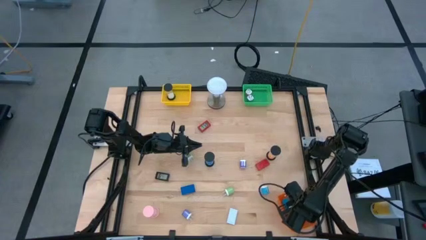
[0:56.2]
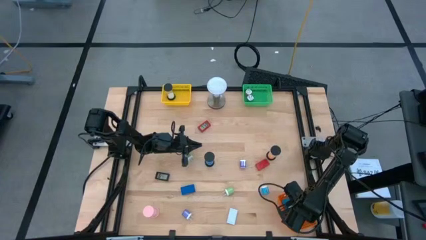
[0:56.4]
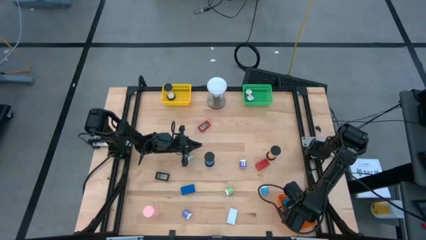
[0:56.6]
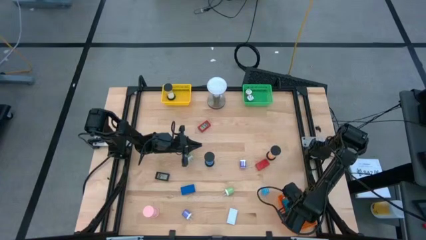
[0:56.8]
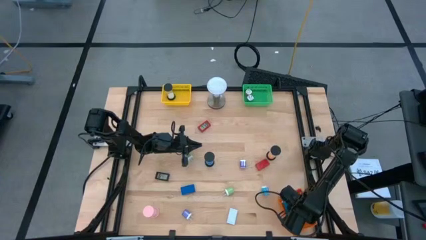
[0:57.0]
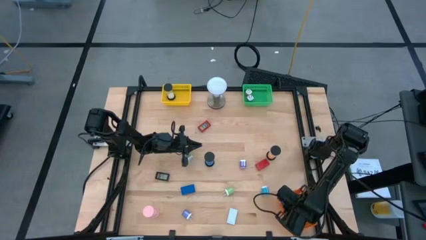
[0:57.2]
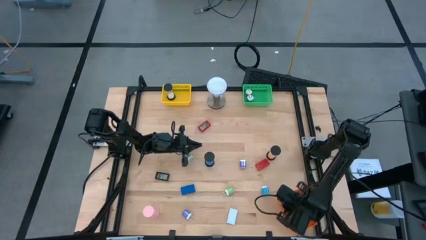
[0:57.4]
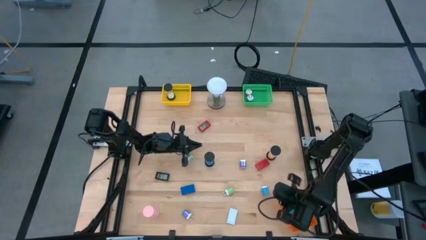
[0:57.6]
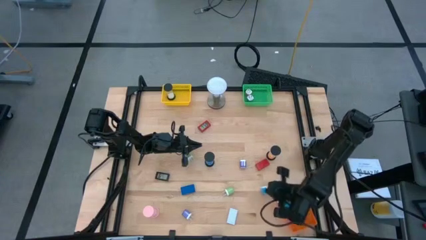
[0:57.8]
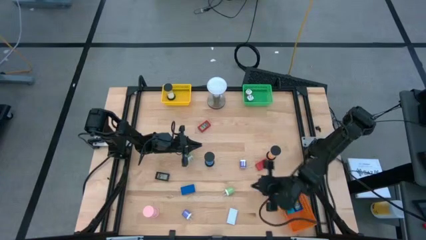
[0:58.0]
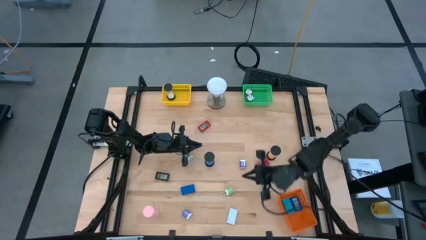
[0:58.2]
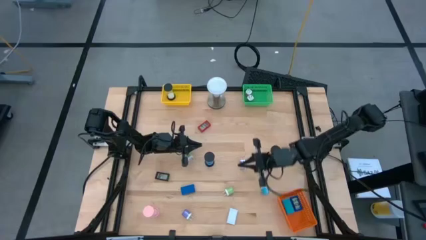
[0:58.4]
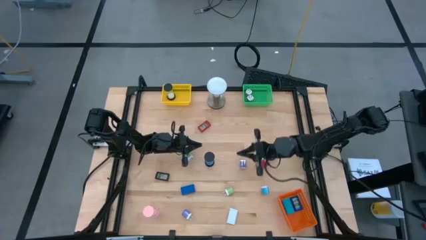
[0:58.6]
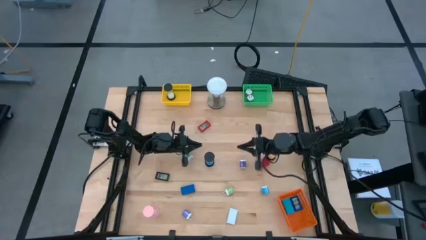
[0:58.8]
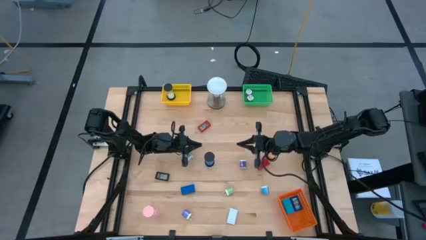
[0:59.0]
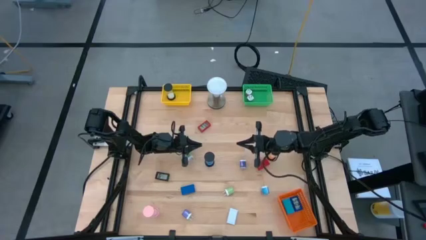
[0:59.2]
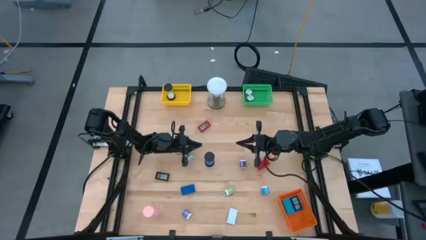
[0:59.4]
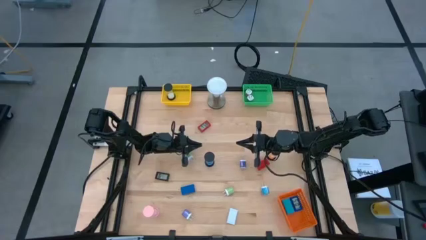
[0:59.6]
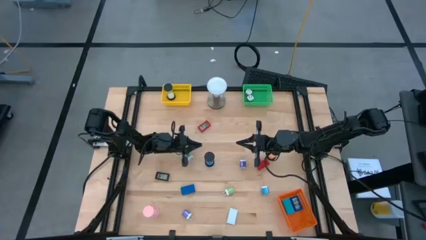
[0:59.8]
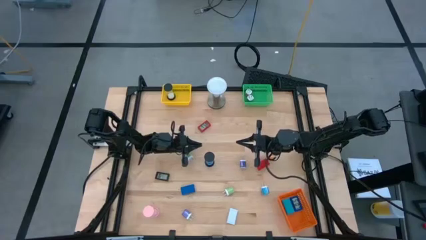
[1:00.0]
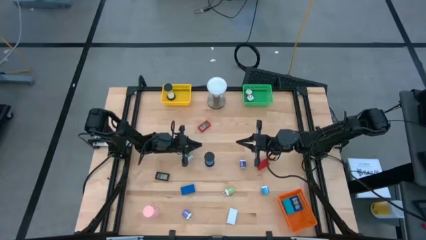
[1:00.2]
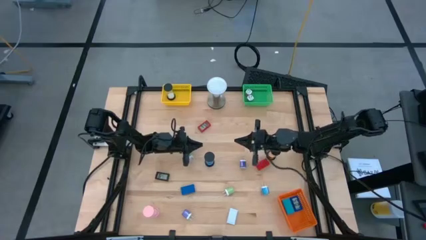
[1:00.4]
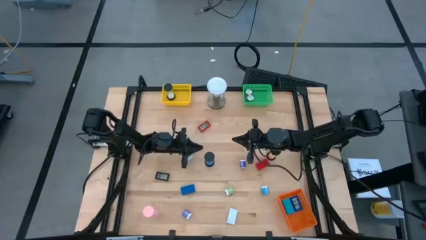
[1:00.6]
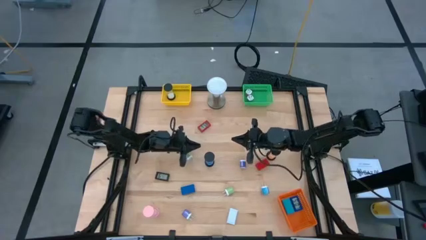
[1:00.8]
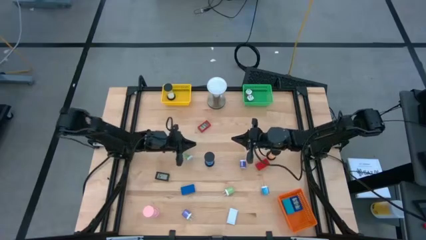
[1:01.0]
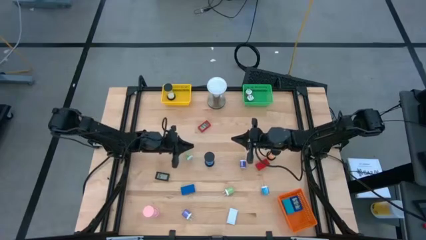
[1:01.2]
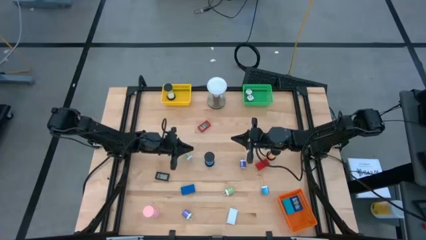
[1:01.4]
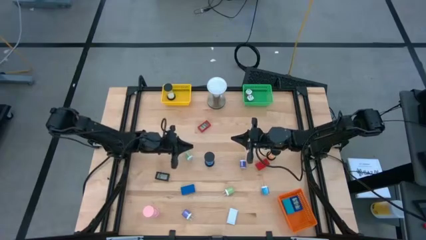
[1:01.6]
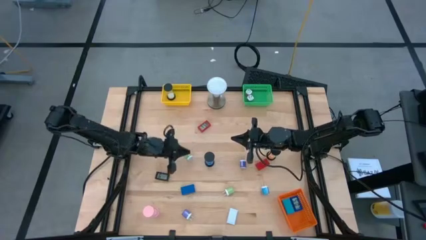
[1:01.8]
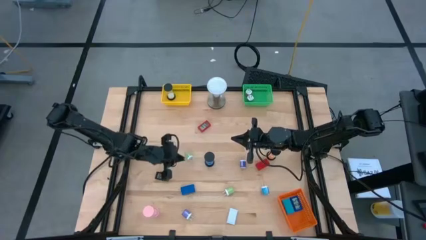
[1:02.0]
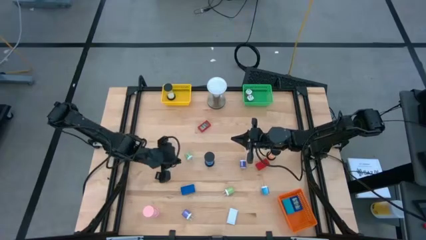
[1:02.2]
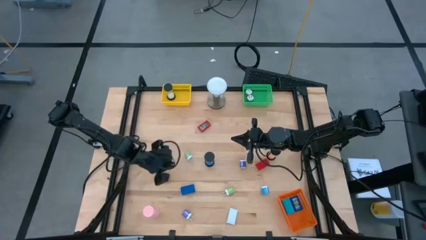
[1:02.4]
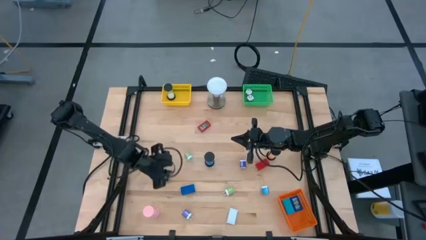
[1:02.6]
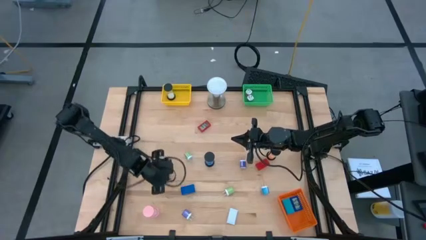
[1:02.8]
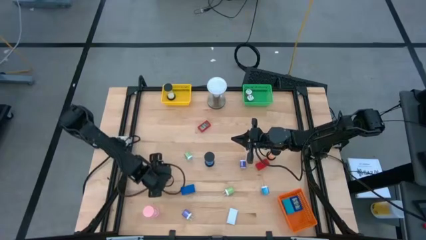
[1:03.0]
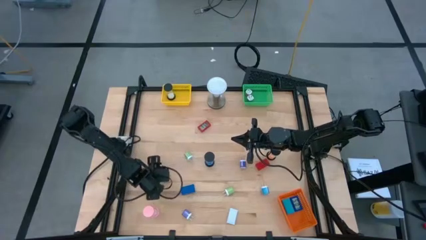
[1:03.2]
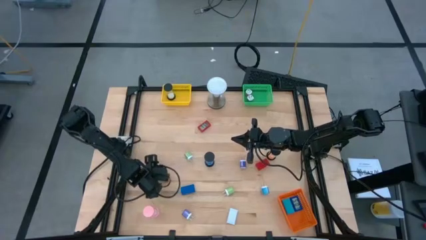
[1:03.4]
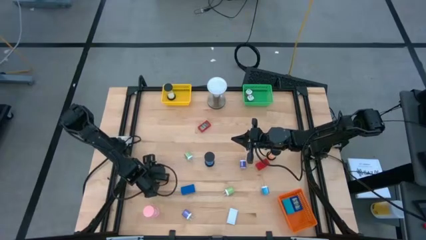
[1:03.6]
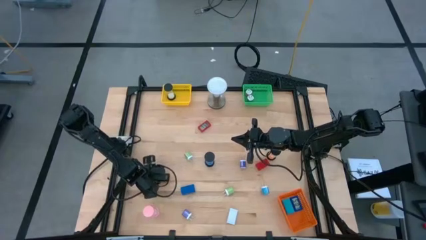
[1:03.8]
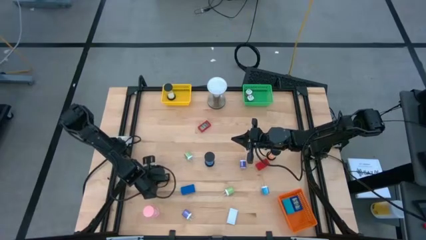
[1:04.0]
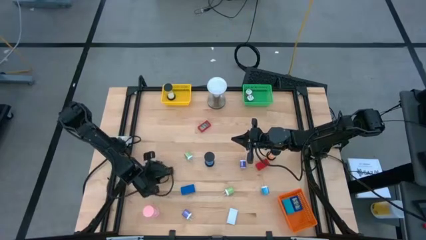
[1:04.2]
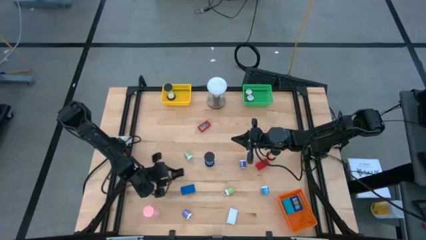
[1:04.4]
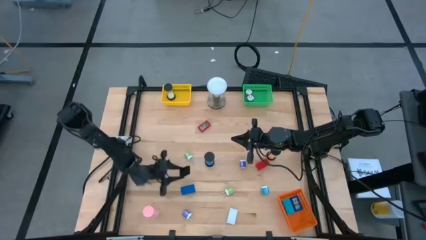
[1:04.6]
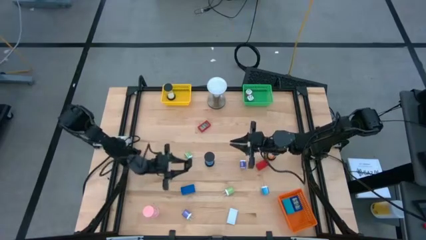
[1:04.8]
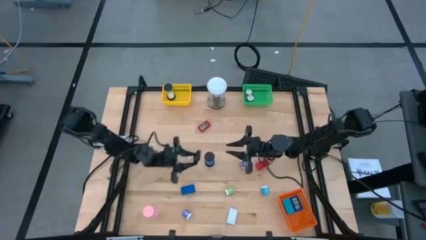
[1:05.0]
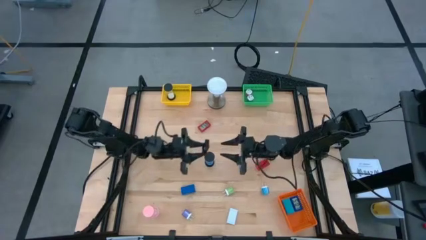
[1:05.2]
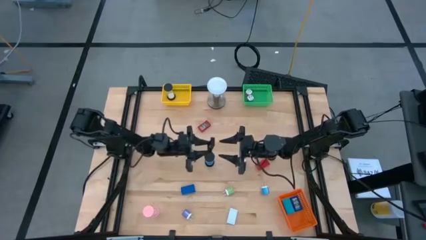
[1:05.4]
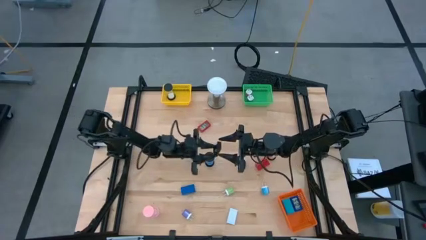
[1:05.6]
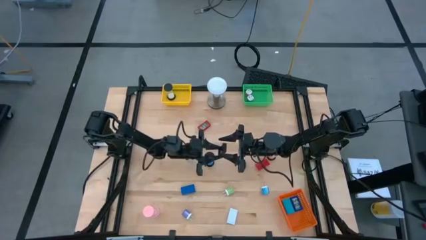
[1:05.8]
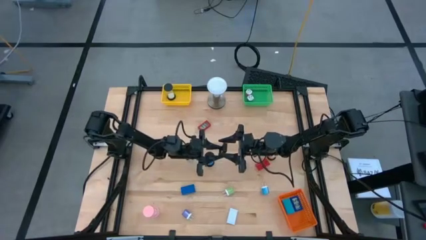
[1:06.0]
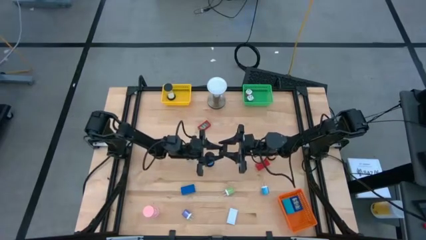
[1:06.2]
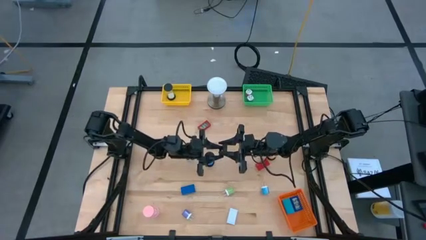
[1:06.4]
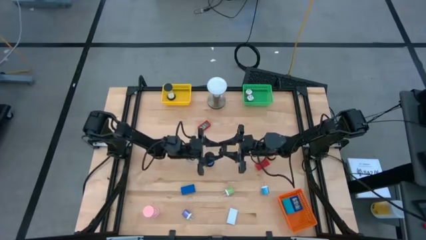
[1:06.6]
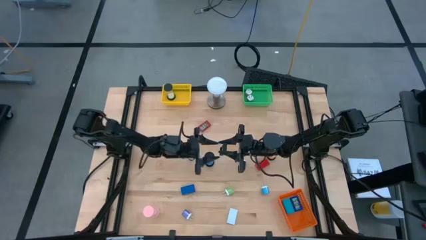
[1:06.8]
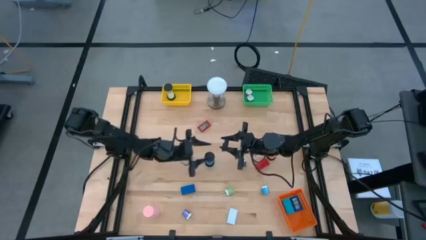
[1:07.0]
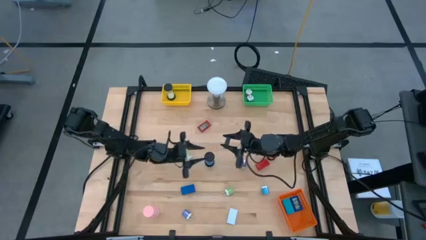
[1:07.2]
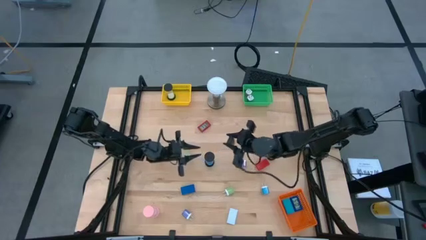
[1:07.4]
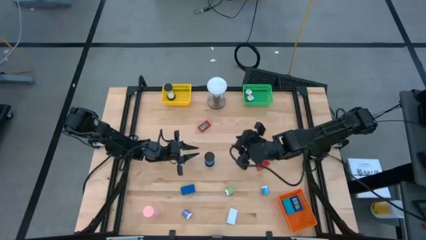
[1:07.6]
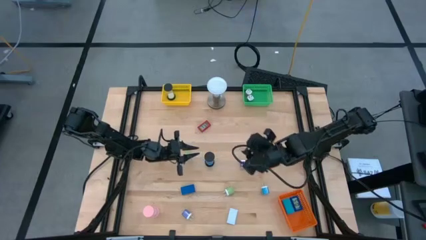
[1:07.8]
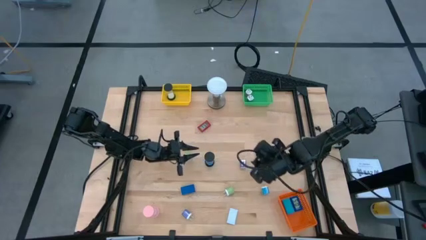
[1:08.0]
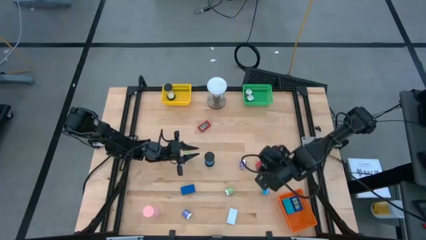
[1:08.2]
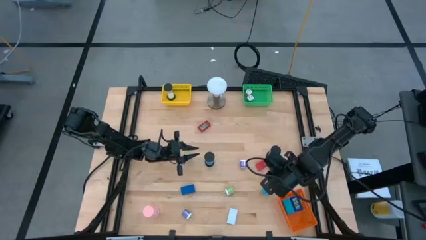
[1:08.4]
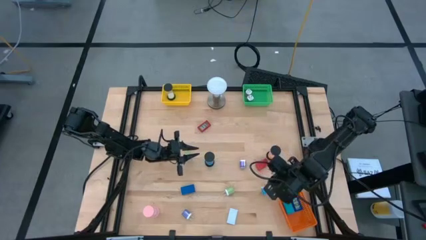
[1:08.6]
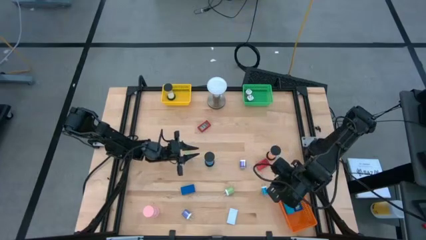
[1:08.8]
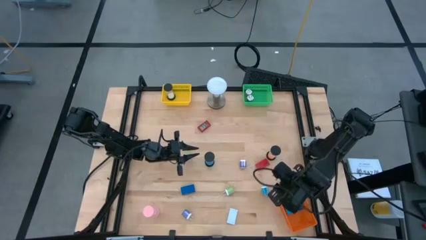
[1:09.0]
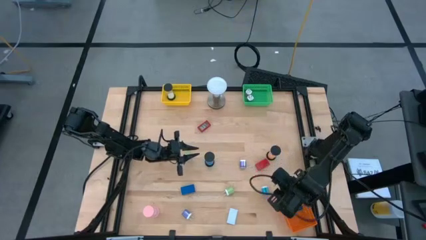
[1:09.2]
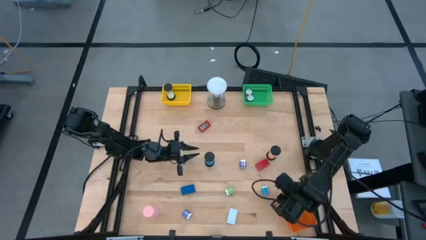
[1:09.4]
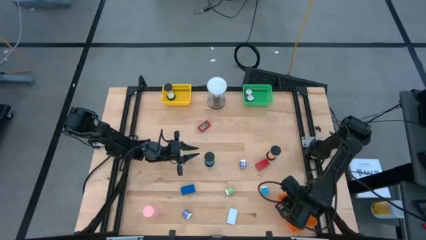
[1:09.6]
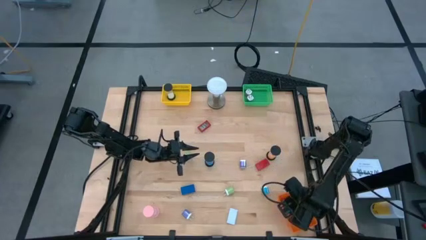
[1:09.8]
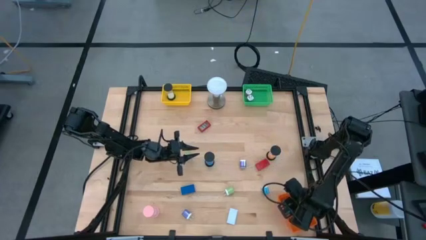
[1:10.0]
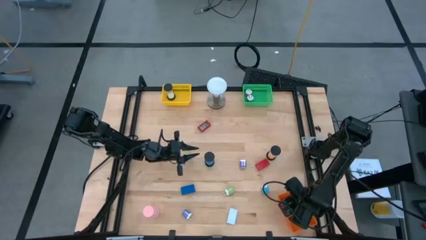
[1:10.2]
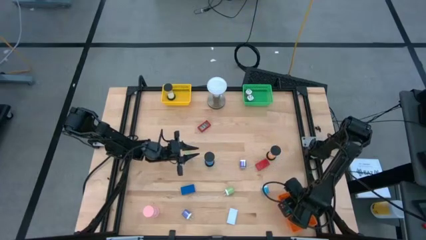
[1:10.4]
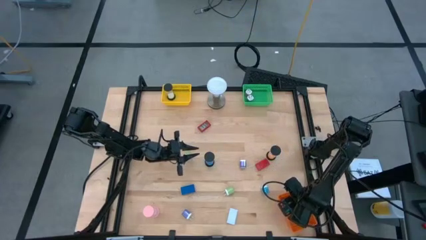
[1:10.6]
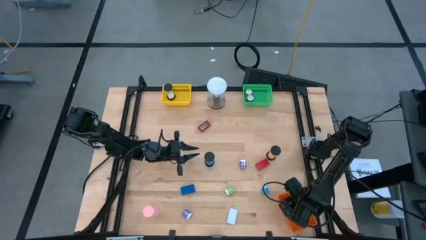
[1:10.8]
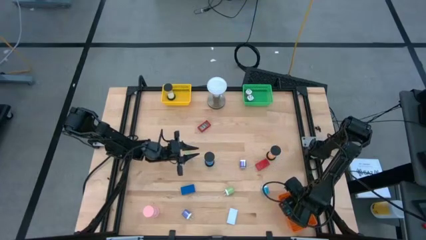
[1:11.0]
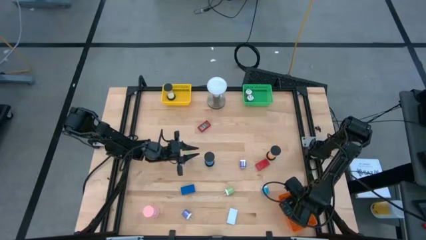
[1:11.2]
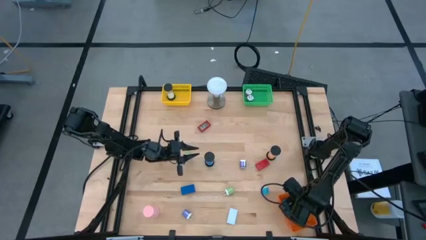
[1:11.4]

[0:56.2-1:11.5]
Task: Pick & Place Office items
Put the black digital timer into the orange bin
